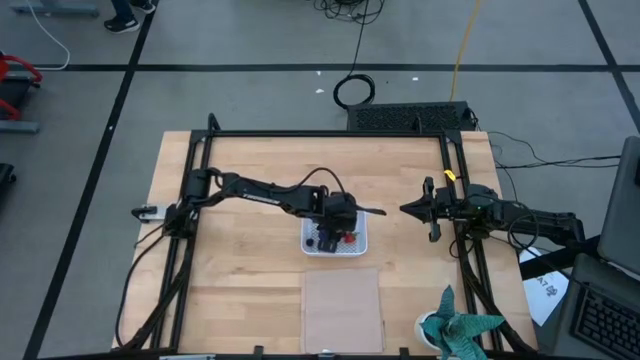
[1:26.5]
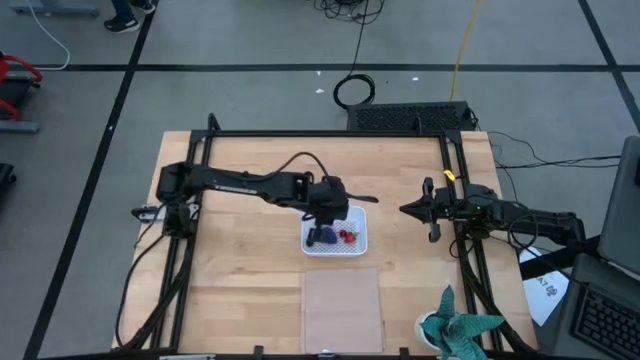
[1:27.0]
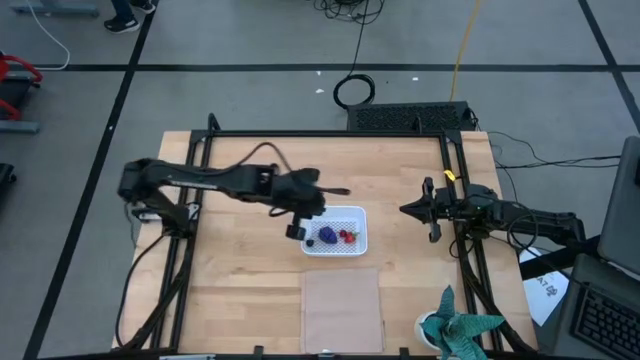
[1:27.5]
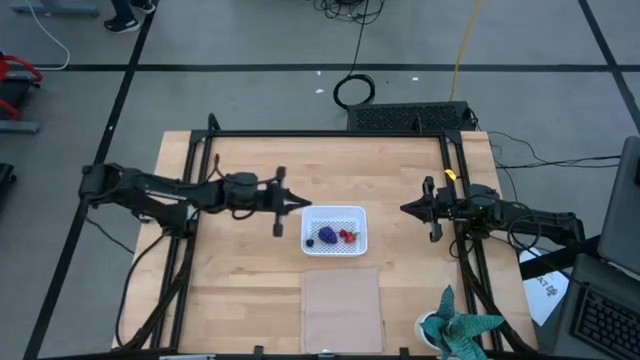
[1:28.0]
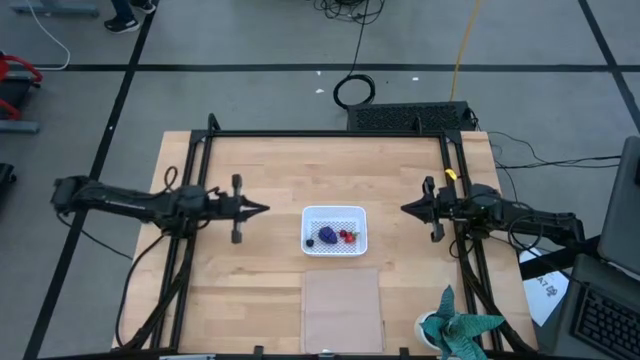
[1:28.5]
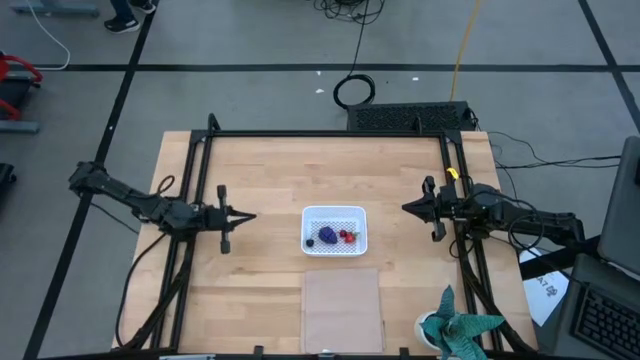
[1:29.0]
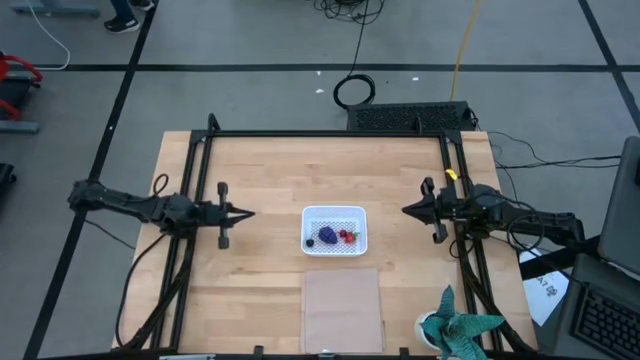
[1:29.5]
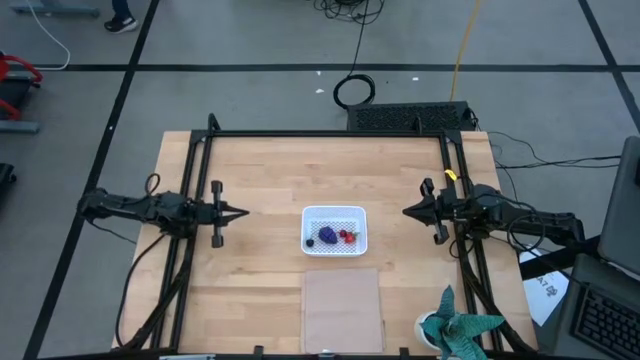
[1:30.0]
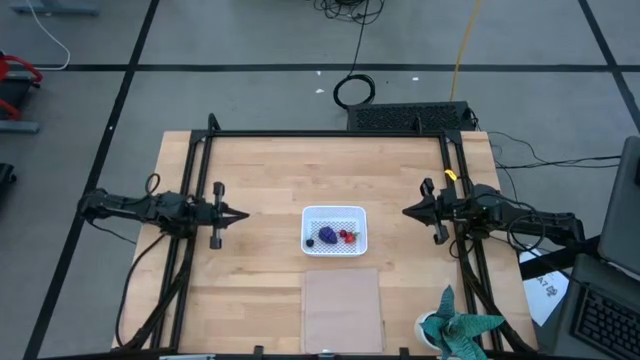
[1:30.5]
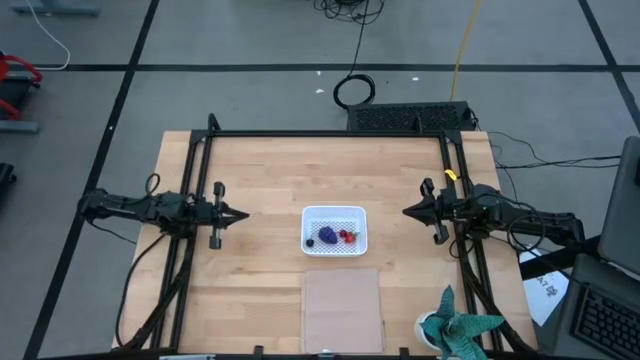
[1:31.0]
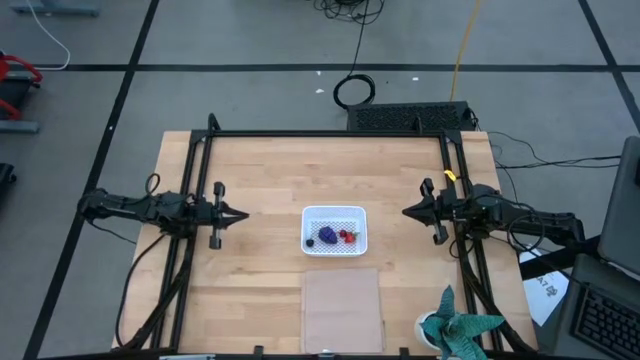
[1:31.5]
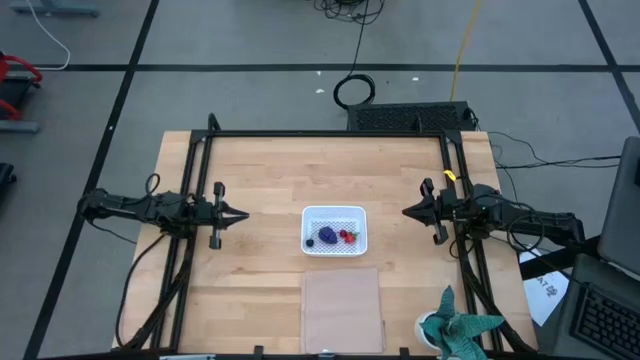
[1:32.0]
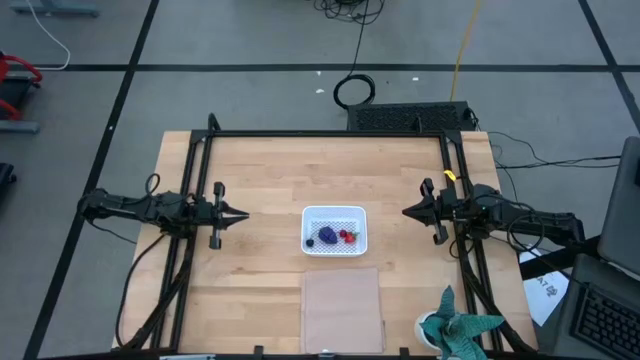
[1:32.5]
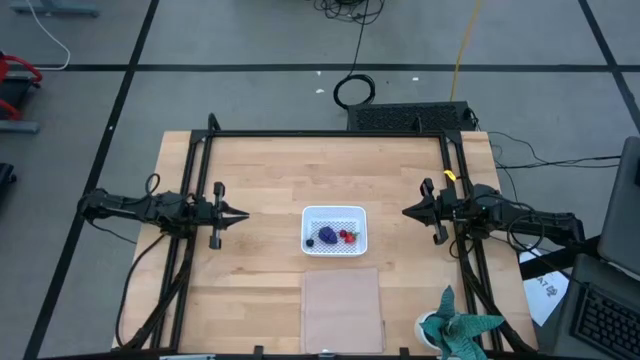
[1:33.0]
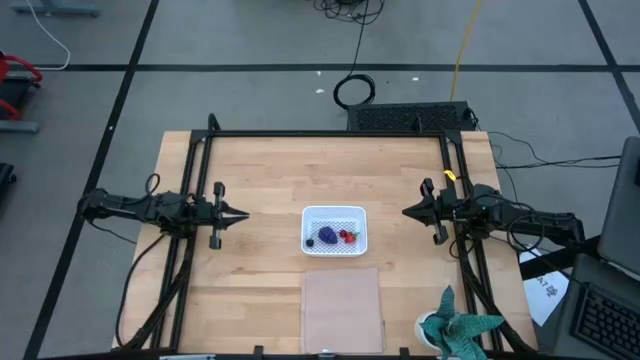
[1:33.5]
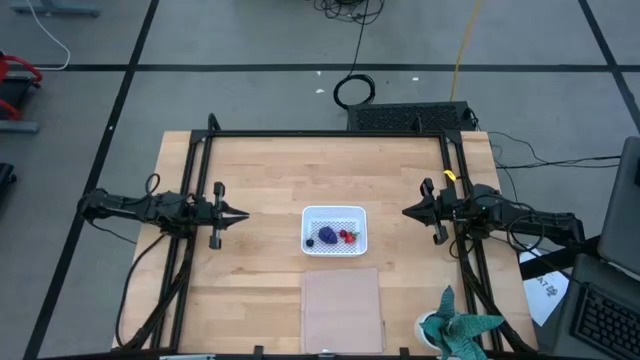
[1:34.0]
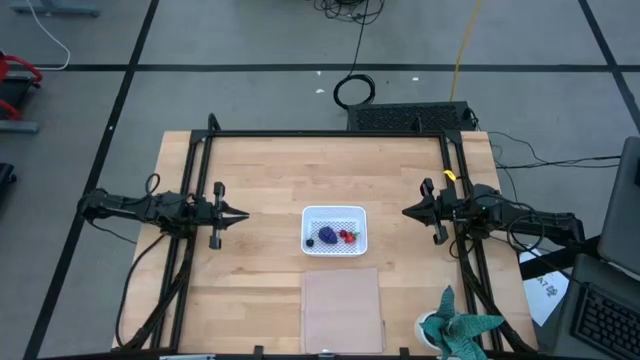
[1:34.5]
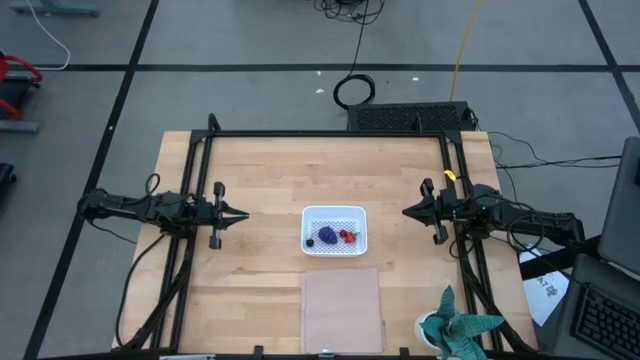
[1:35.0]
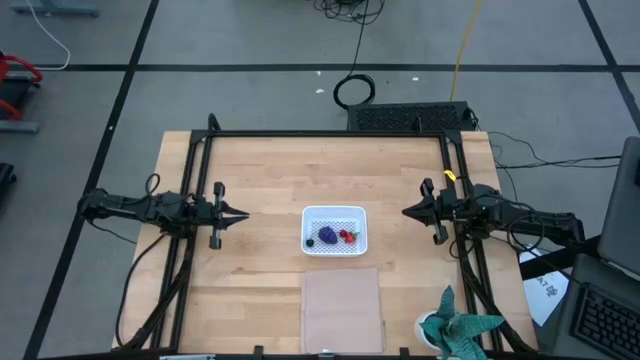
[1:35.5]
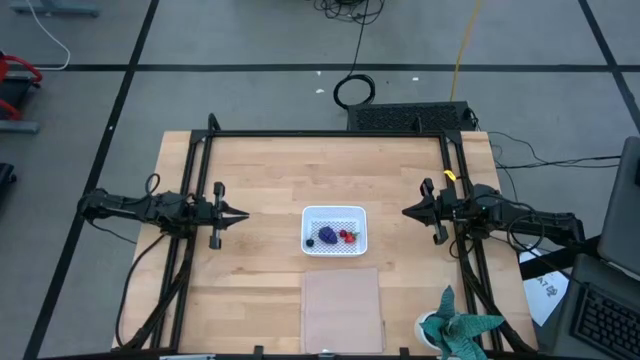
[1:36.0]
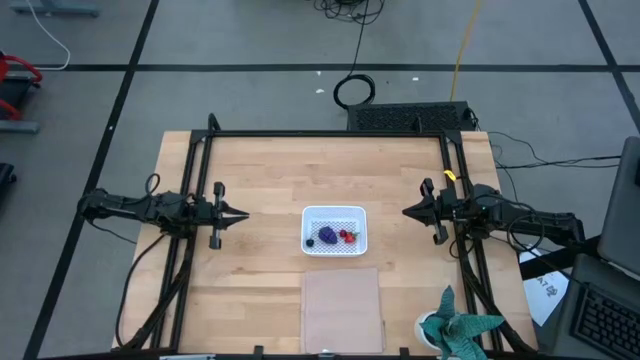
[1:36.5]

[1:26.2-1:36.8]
Task: Pick and placing Produce into tupperware
Return to Home Position

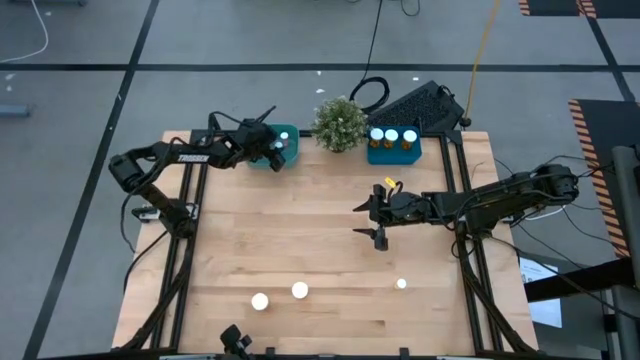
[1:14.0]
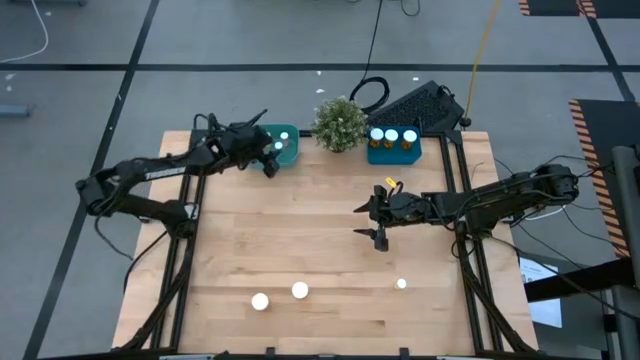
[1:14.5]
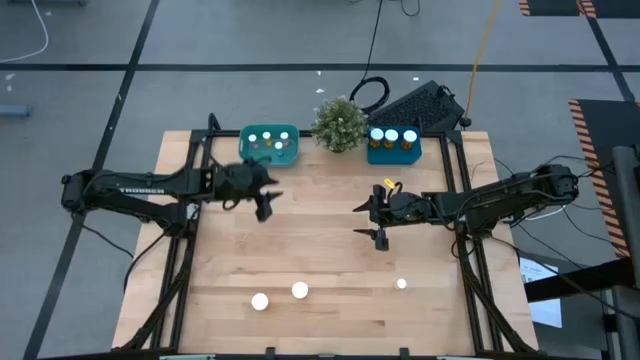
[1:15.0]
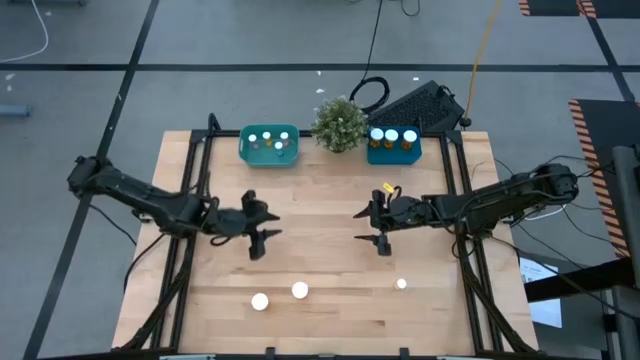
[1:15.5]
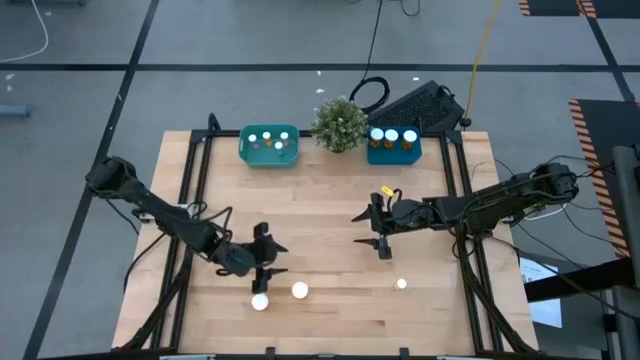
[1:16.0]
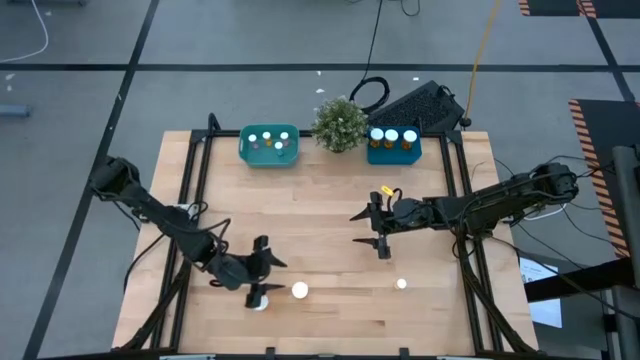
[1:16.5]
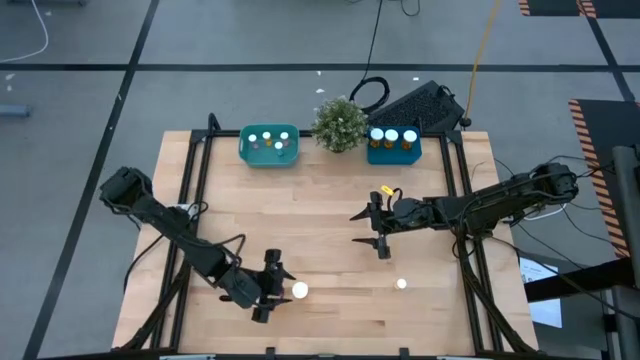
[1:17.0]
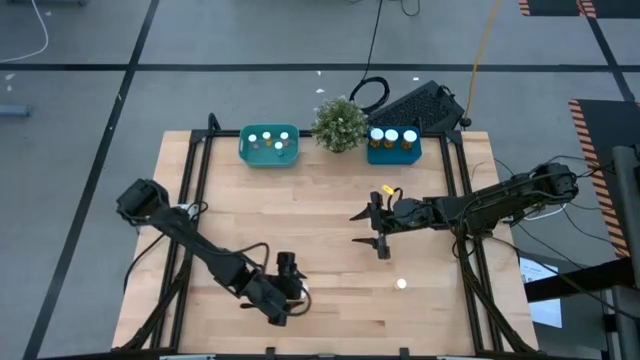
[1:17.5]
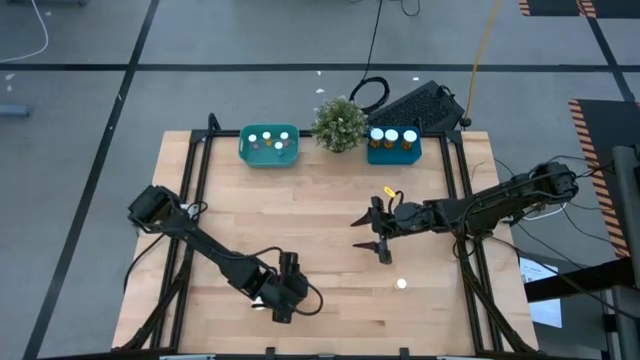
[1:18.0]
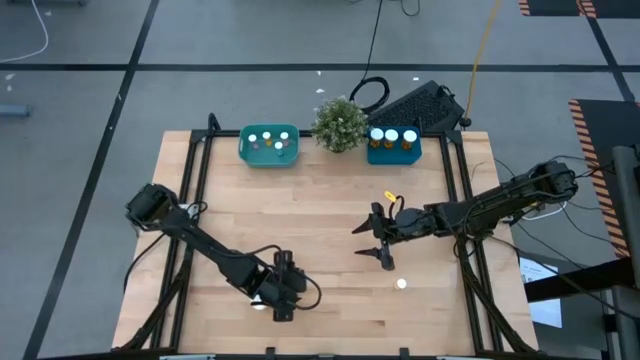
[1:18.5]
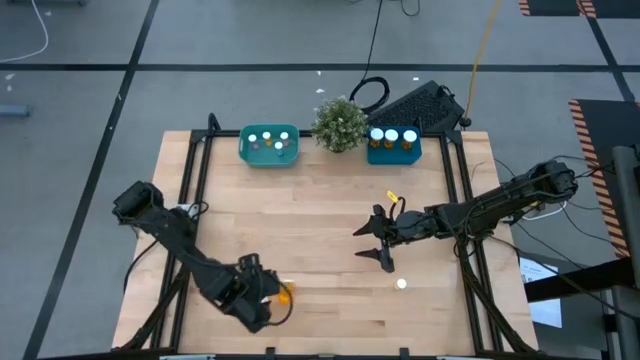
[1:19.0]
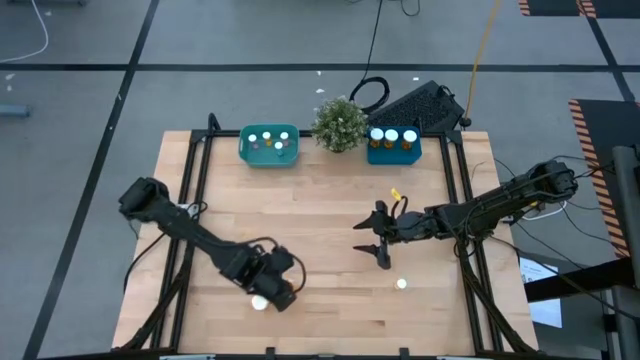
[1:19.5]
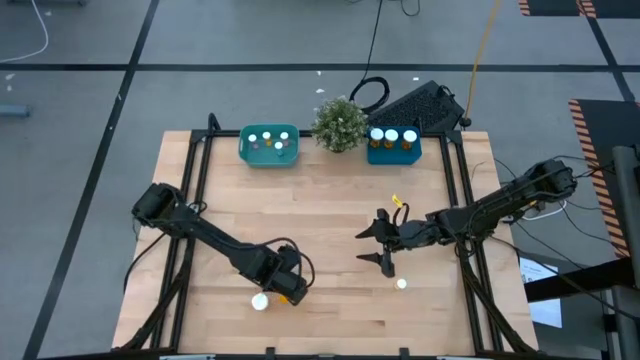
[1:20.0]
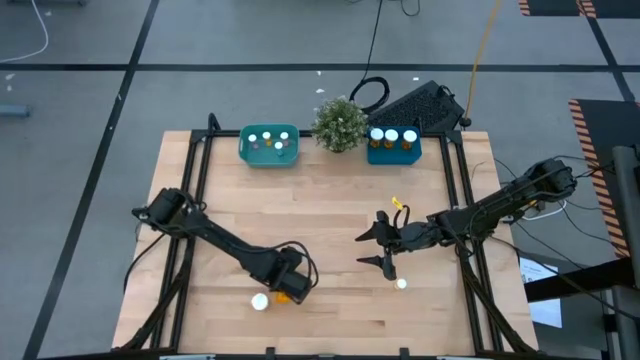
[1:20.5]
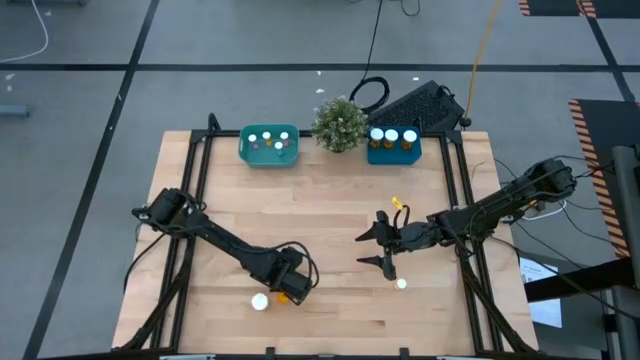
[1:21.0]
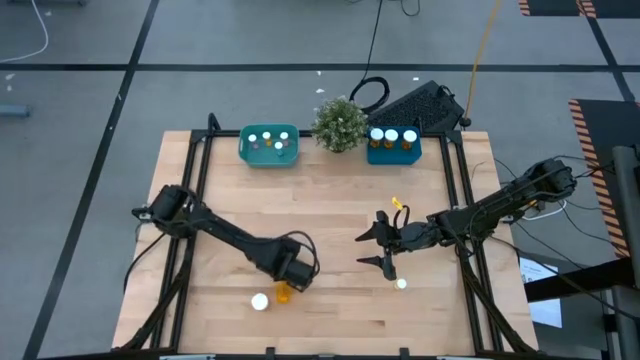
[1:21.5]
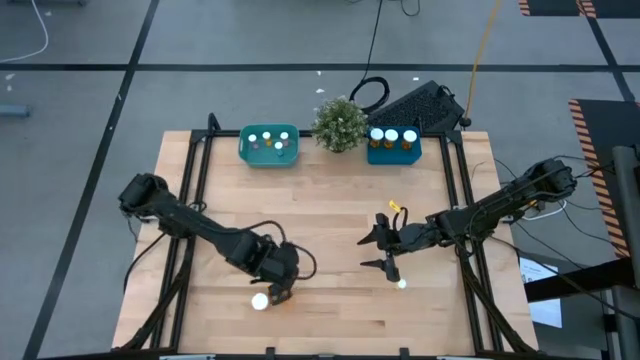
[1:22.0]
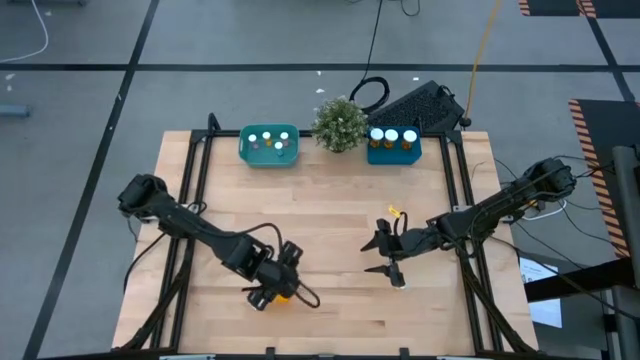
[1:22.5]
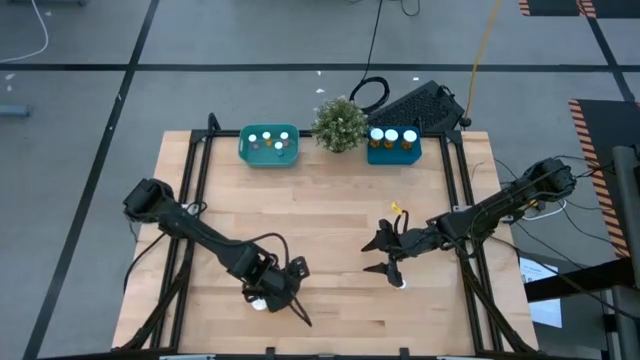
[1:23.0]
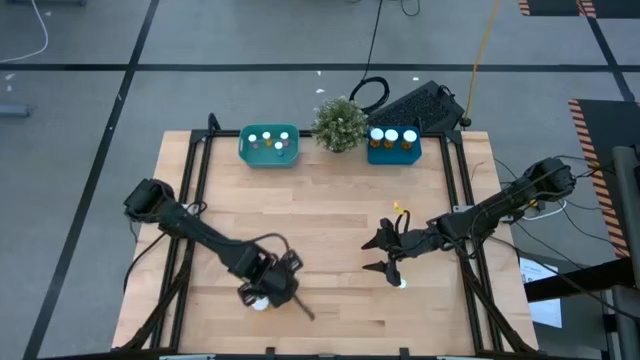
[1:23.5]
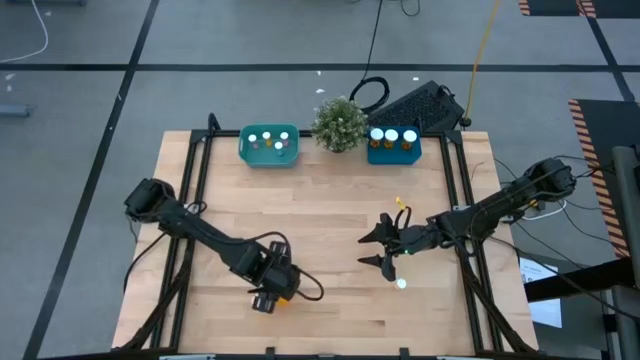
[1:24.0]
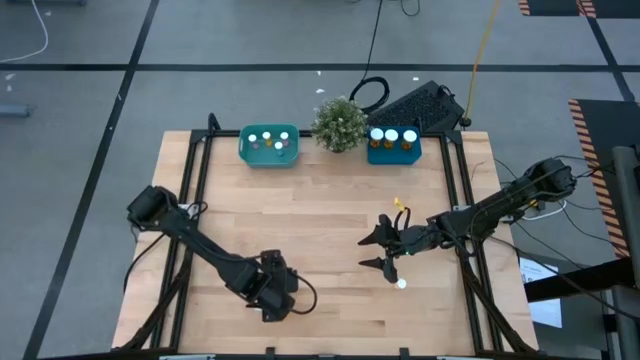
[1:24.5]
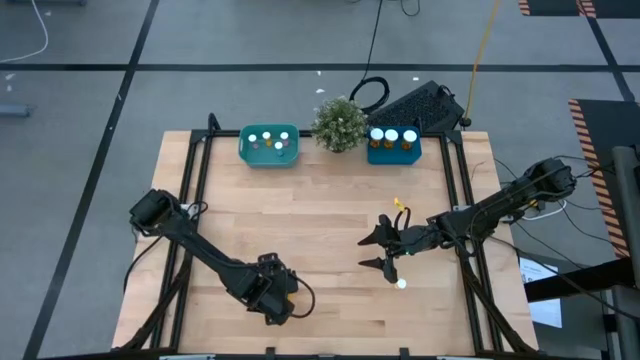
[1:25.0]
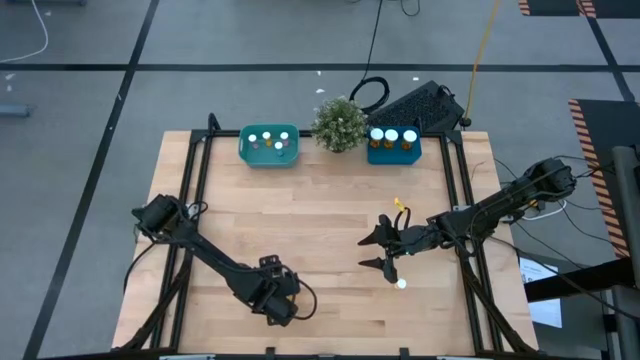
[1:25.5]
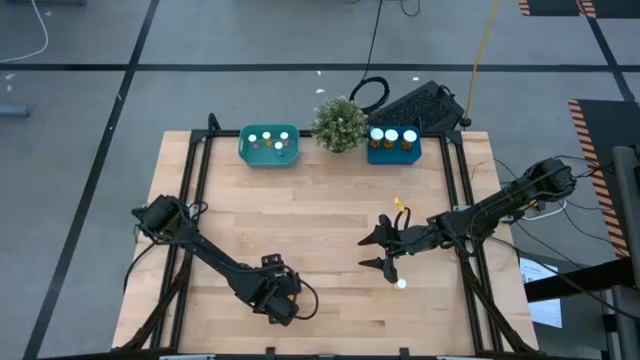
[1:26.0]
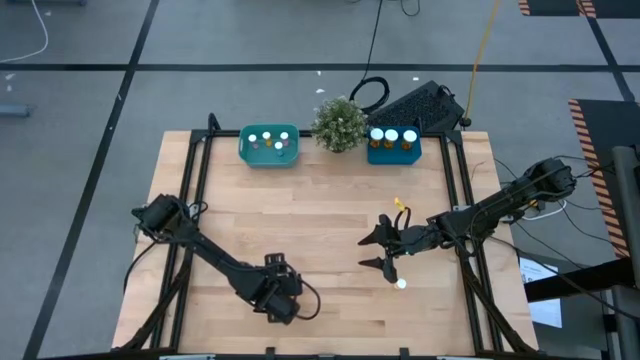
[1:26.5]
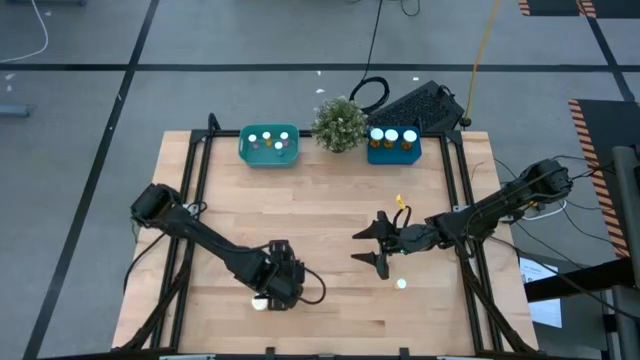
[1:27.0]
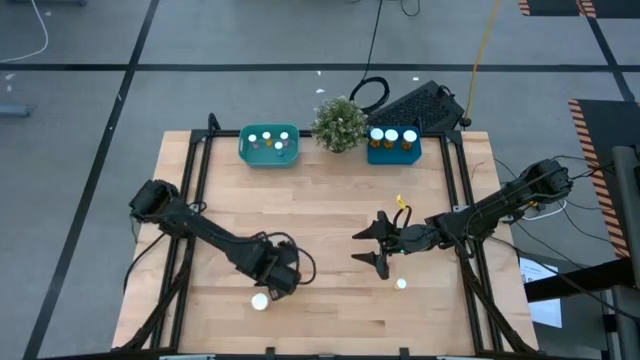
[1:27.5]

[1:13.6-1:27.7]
Task: Pick and place medicine bottles into bin by pill shape (circle, oval)
Put the big orange pill bottle into the blue bin
